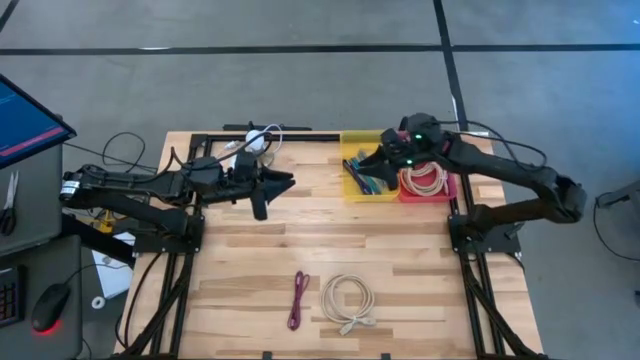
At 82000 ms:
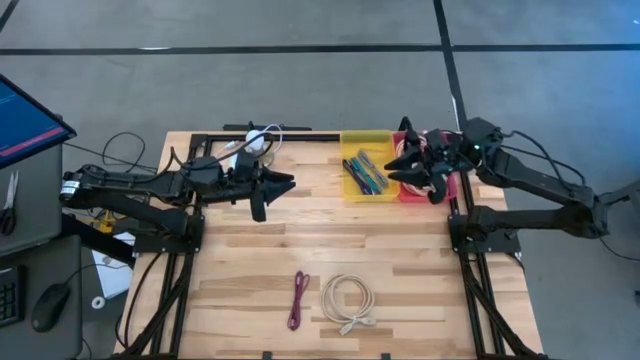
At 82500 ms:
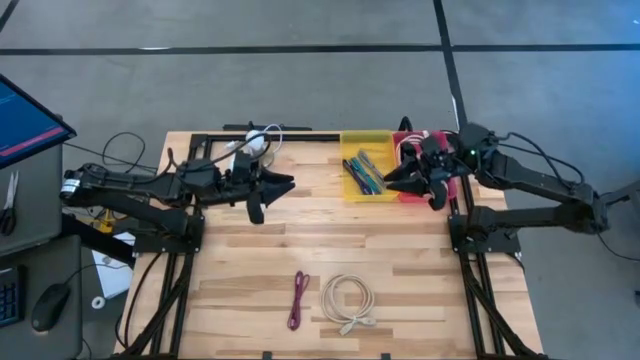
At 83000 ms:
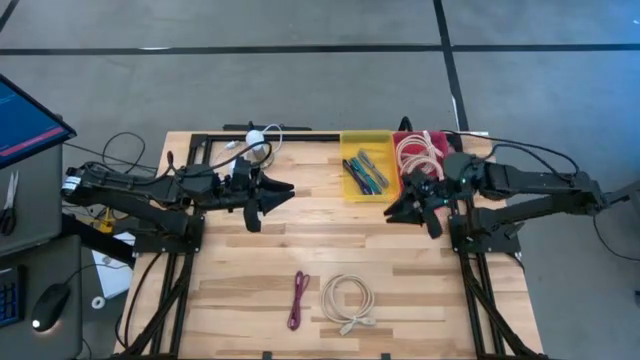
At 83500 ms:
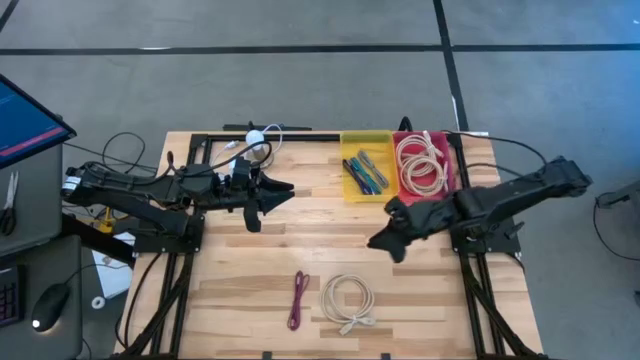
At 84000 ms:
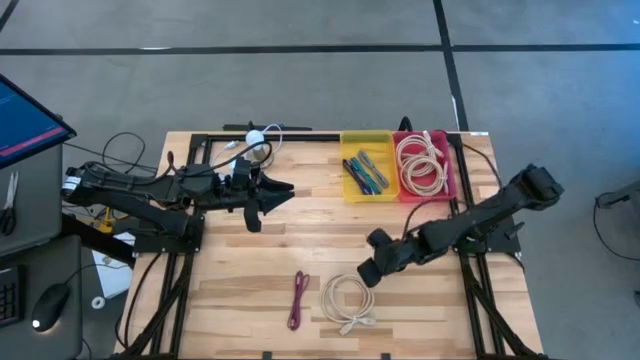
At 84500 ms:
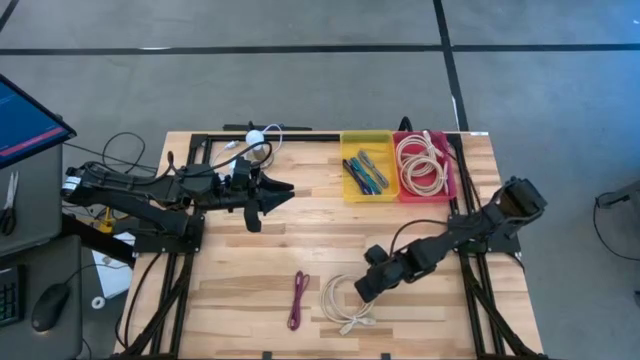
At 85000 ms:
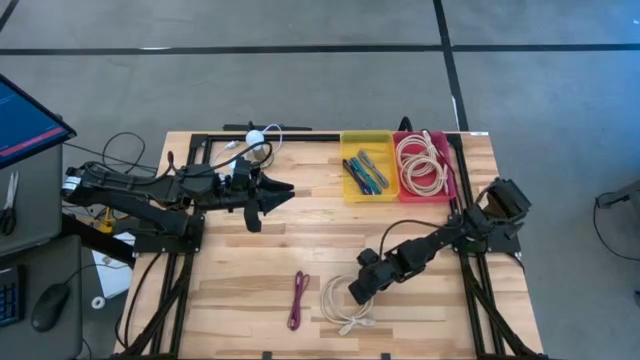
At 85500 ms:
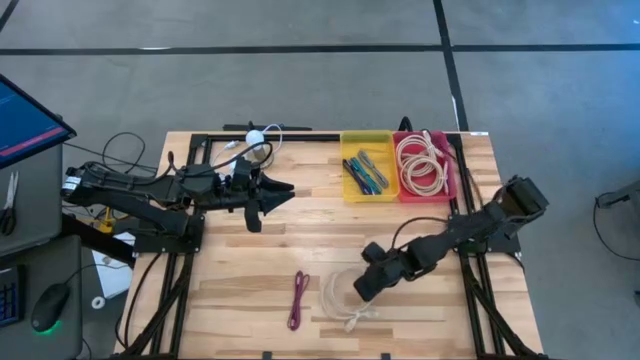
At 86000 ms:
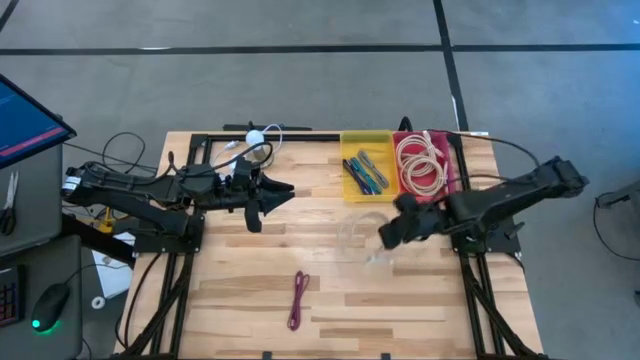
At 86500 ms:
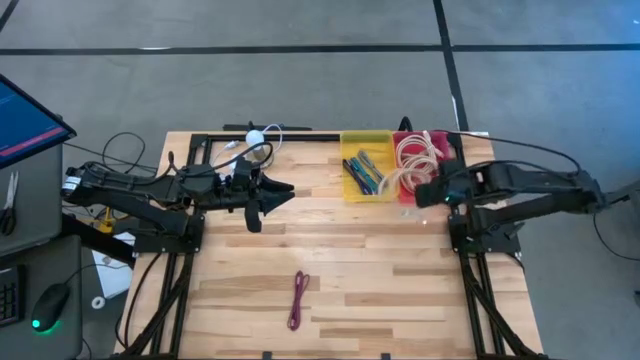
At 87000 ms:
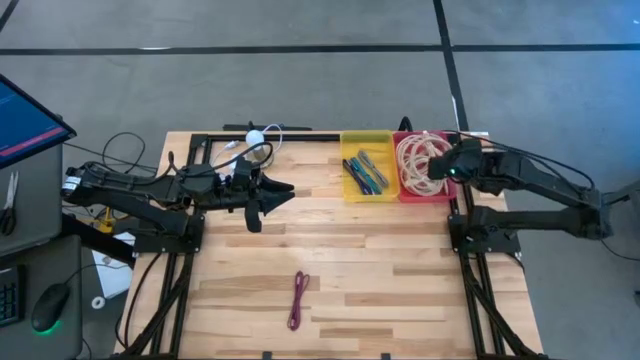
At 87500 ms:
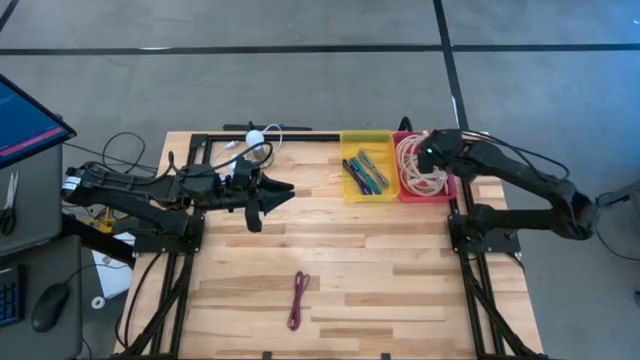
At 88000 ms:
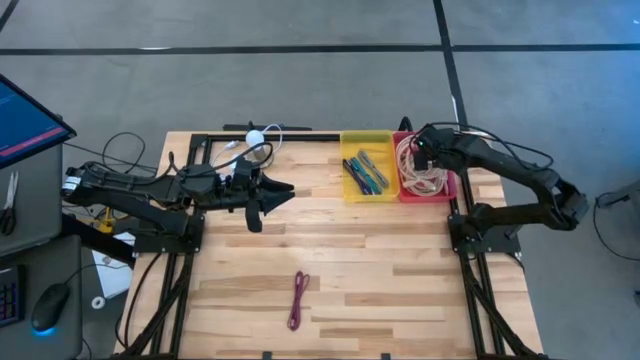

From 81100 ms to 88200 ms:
Task: Pick & Place USB Port
Put the white HDMI cable into the red bin

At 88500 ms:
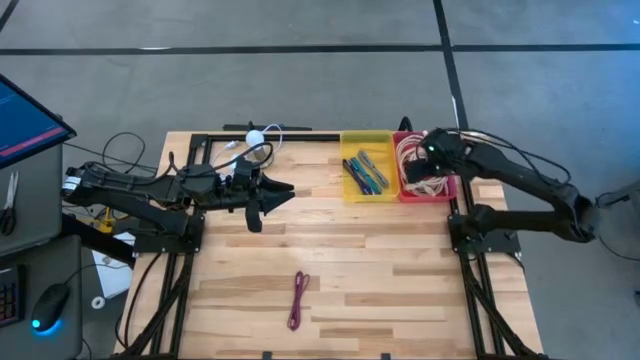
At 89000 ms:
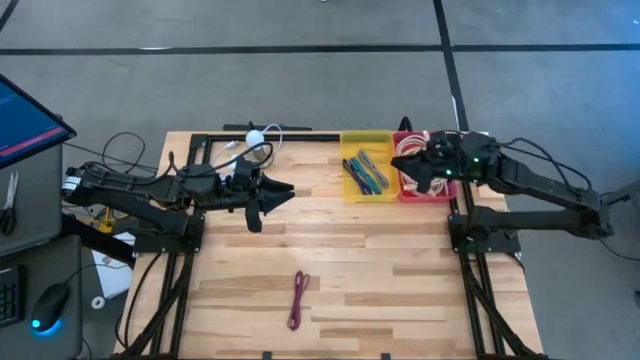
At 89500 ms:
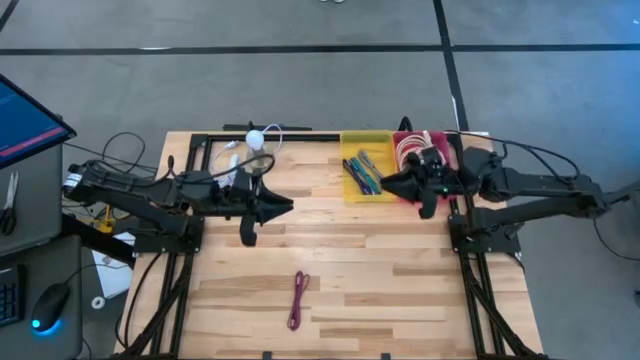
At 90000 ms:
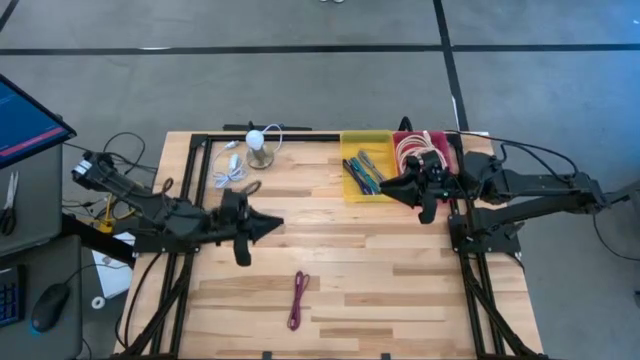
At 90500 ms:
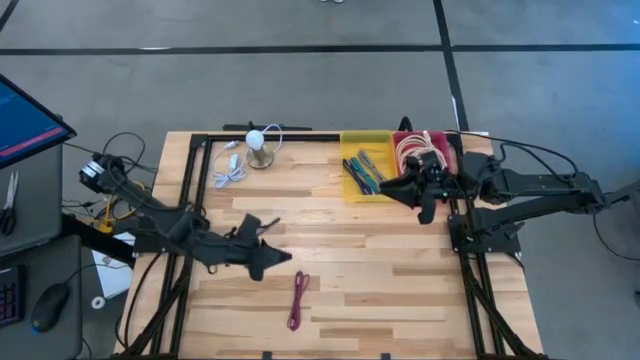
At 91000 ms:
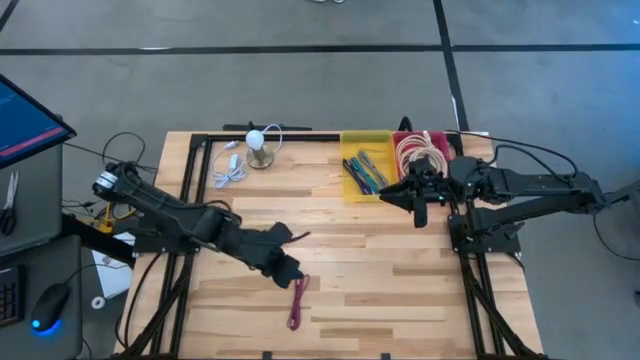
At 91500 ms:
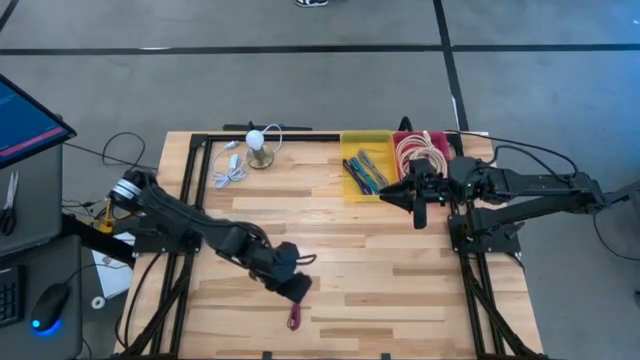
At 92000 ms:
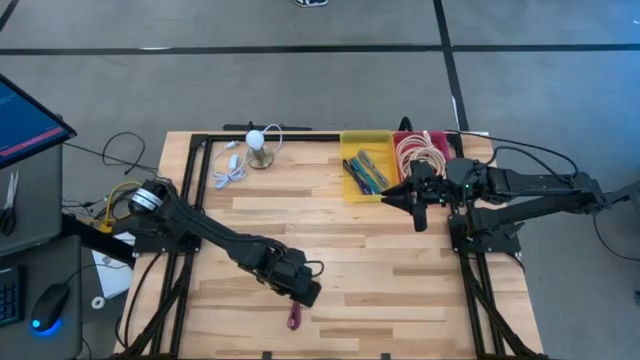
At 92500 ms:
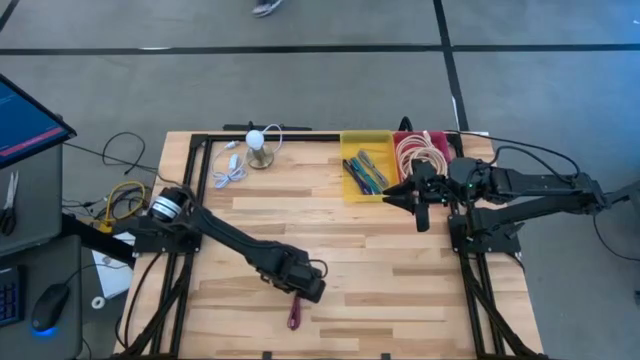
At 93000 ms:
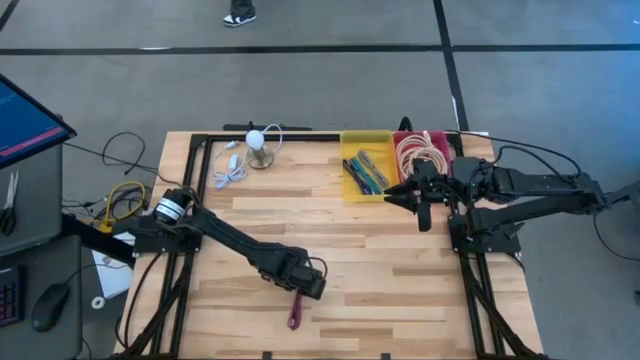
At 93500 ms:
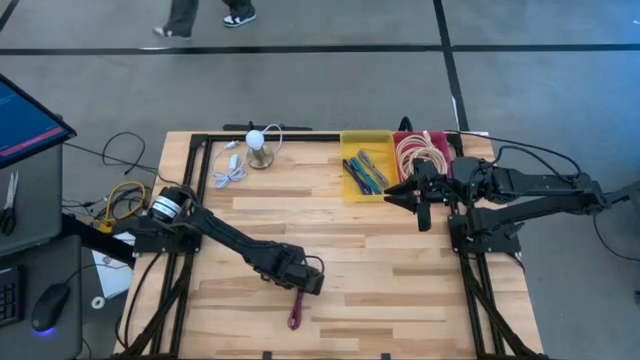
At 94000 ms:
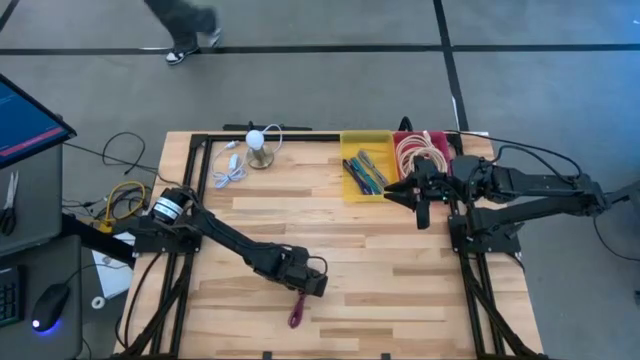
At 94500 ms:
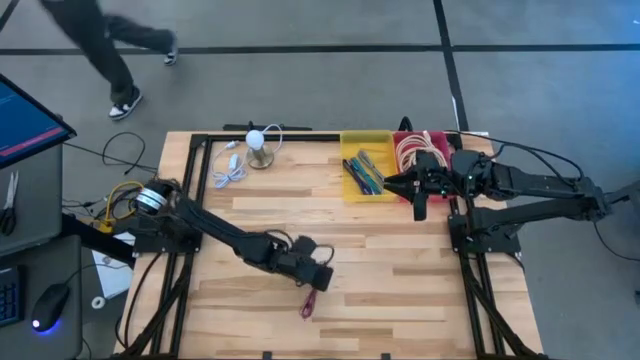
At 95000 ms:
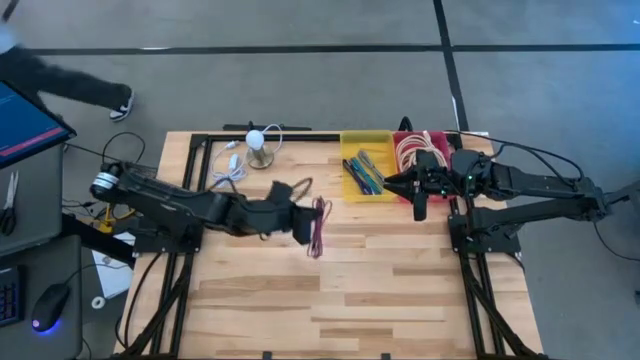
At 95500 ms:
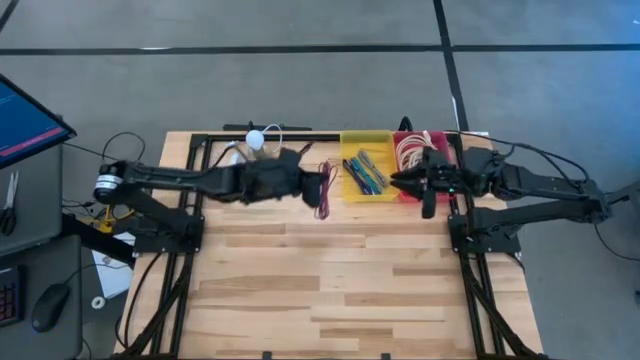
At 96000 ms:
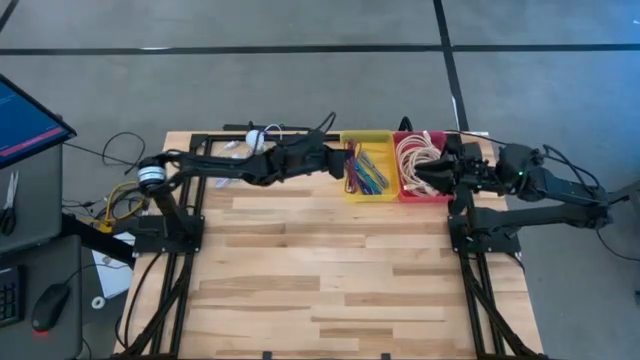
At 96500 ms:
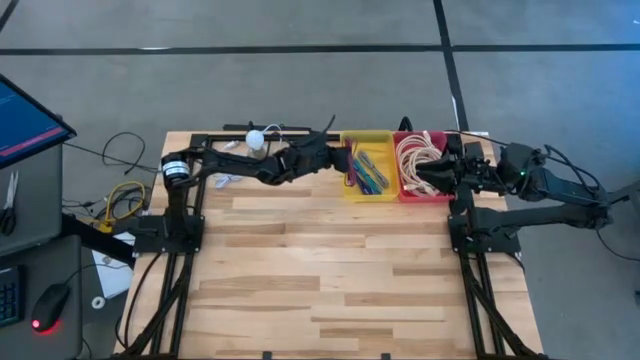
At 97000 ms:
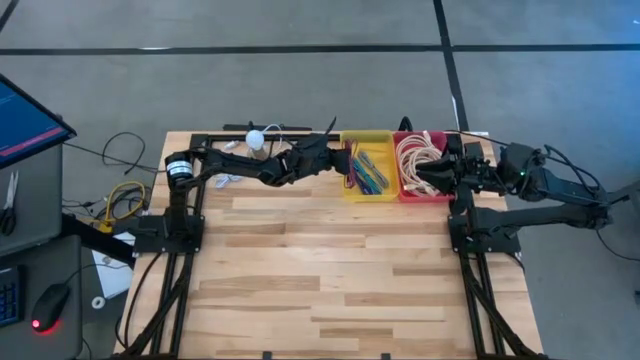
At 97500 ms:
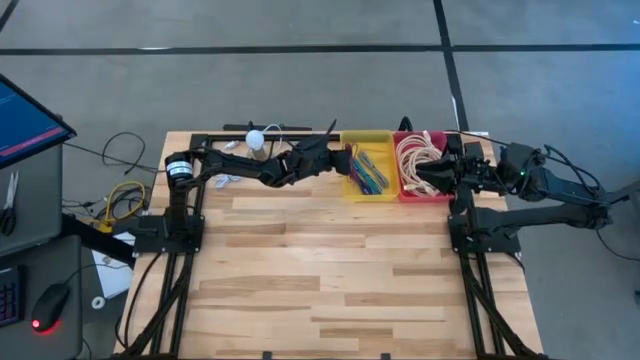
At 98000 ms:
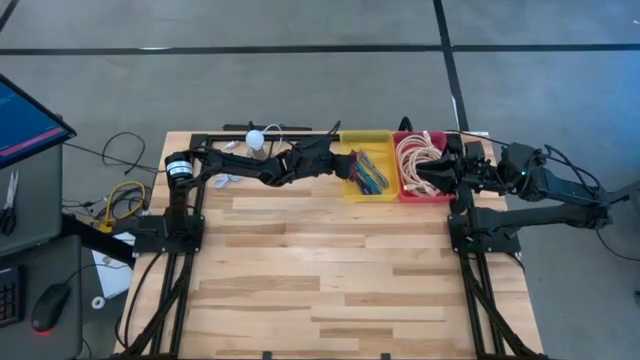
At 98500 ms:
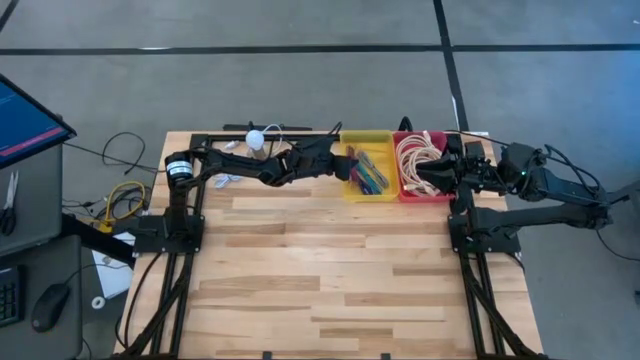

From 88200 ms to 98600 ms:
Put the pink charger cable into the yellow bin

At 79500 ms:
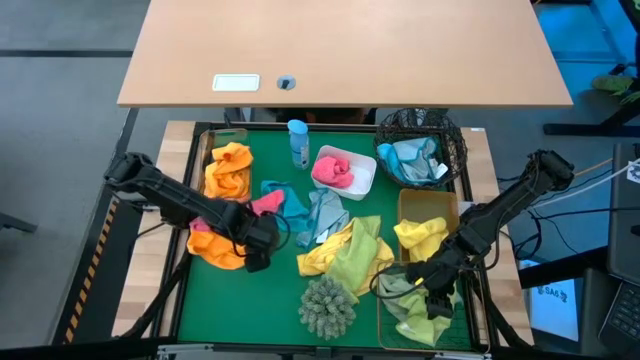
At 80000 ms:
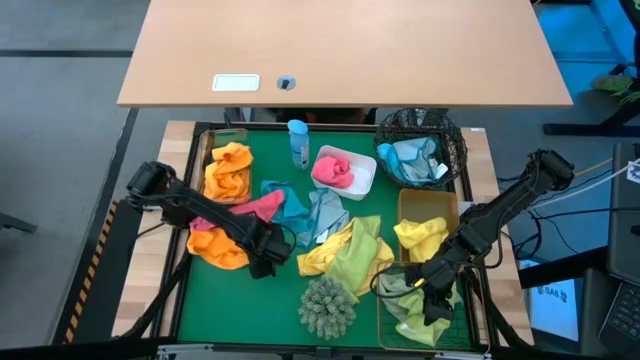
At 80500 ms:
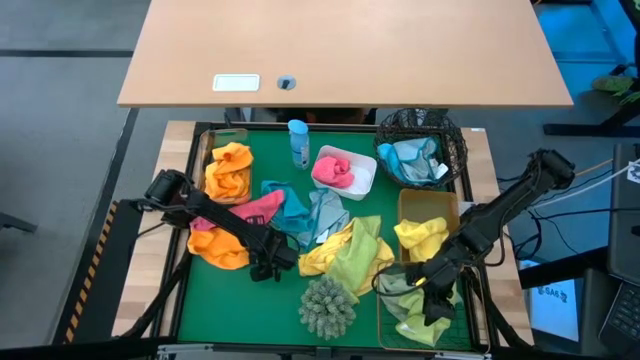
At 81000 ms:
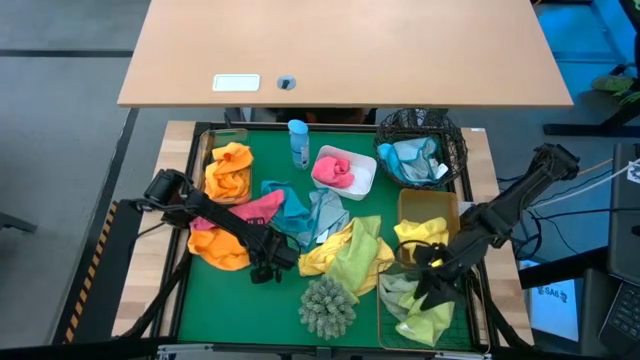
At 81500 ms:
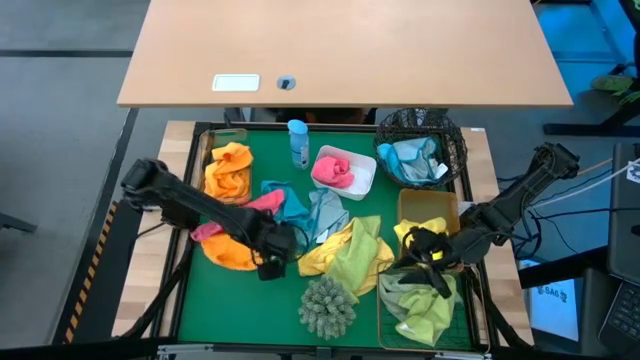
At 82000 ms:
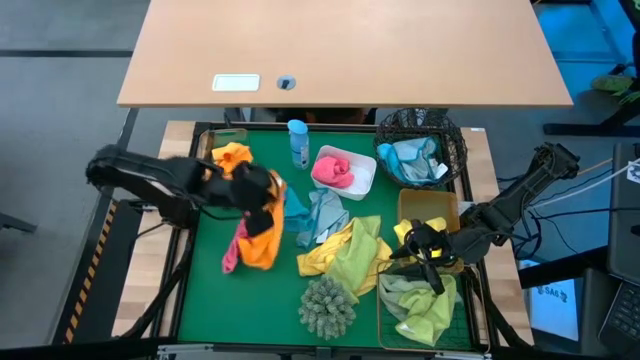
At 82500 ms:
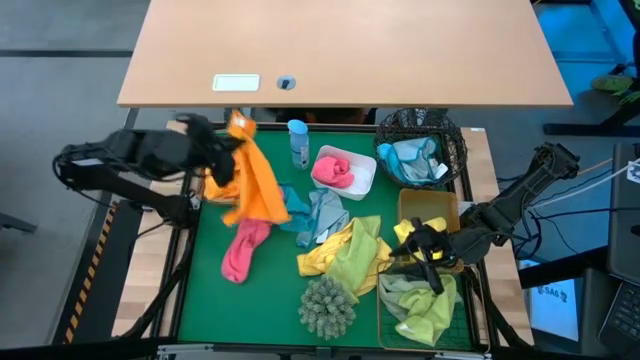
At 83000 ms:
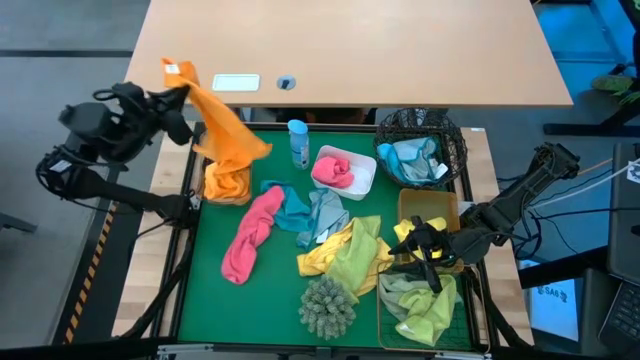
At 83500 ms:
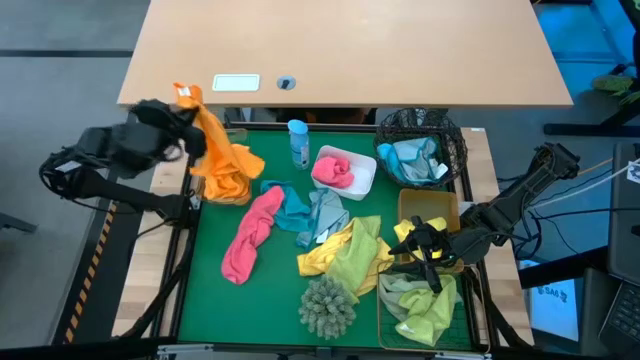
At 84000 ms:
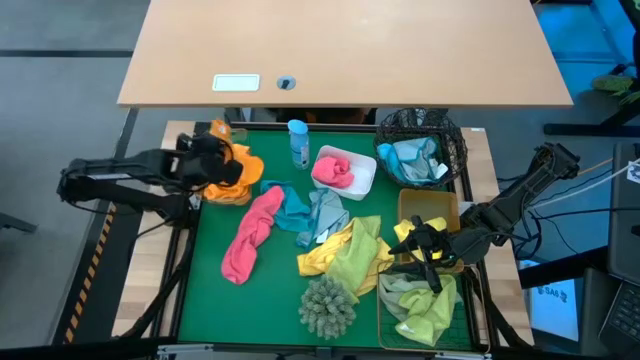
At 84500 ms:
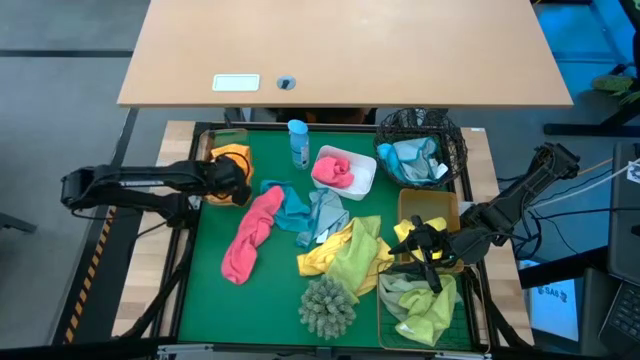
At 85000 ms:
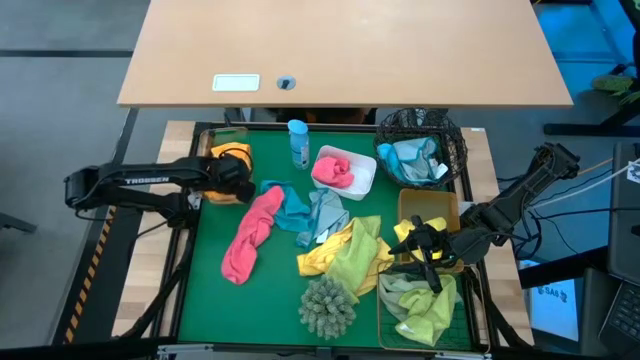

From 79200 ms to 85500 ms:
Task: Sort microfiber towel by color & place in baskets
Put the orange microfiber towel into the transparent bin
